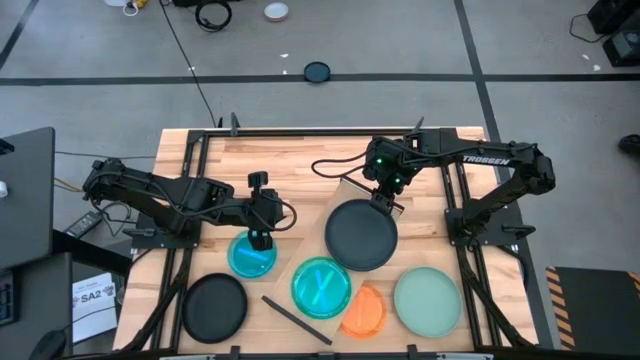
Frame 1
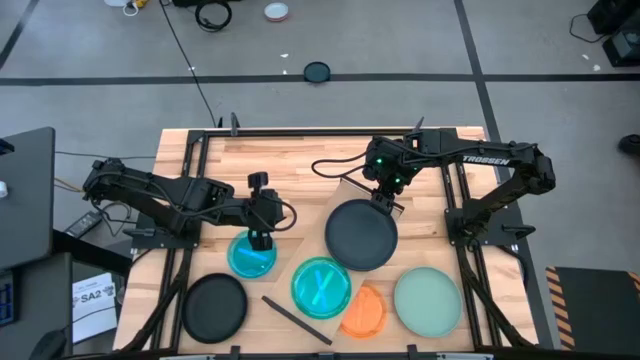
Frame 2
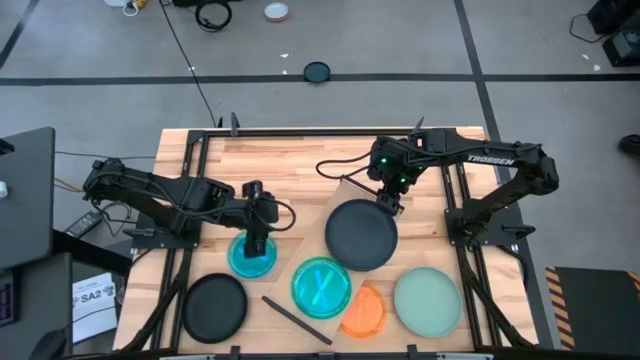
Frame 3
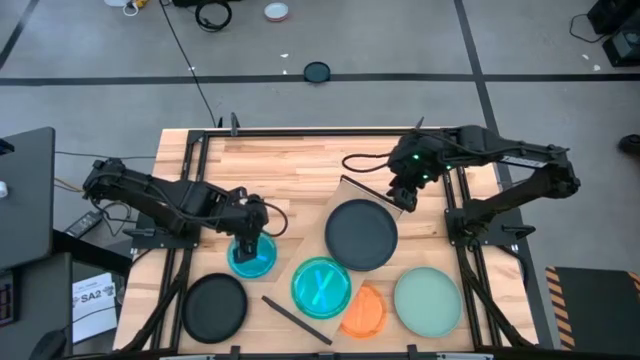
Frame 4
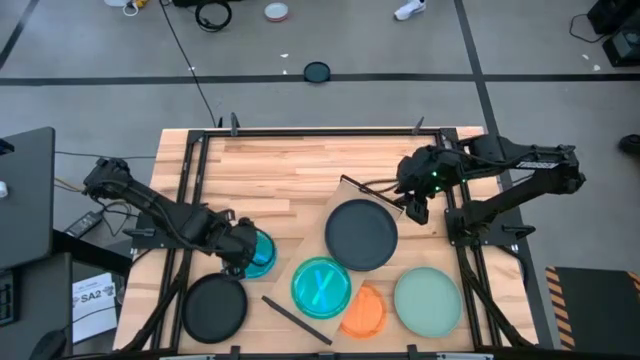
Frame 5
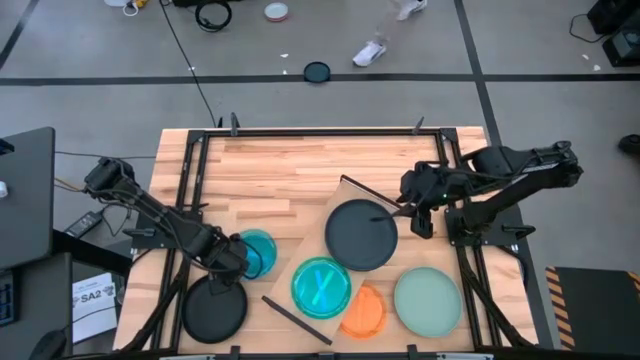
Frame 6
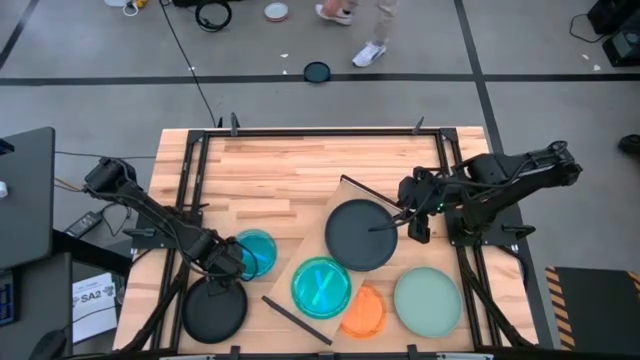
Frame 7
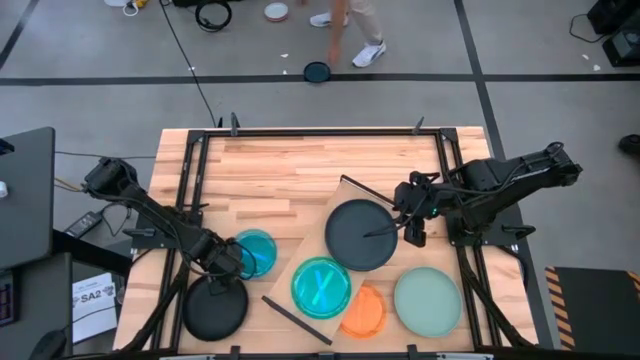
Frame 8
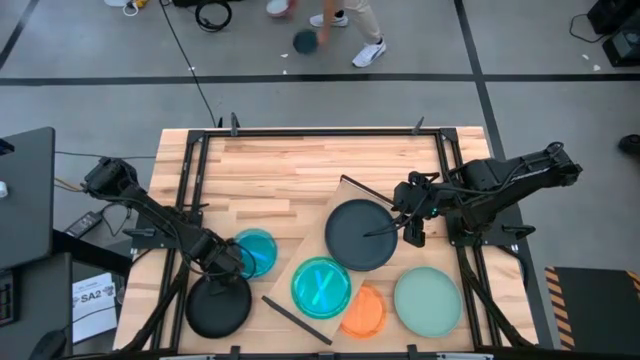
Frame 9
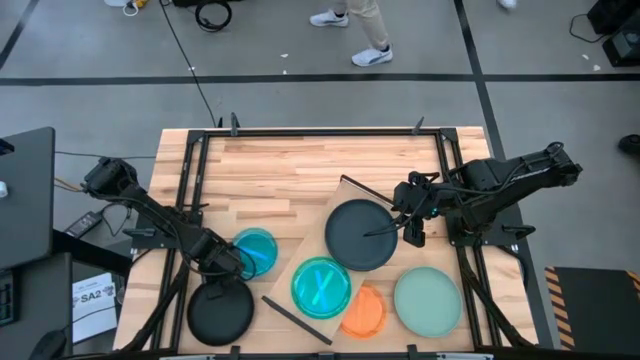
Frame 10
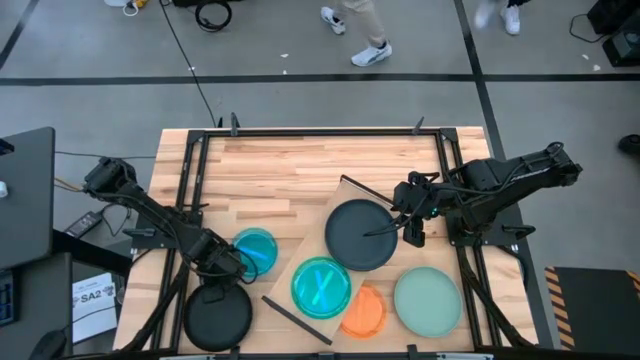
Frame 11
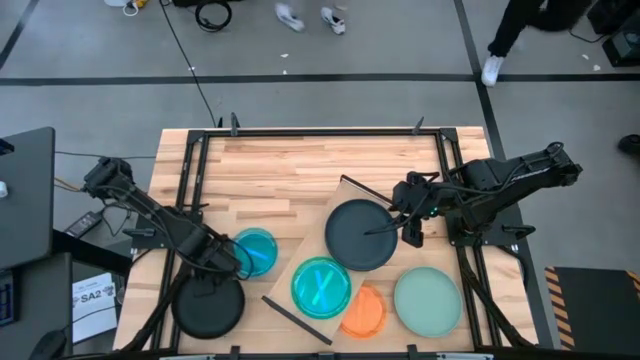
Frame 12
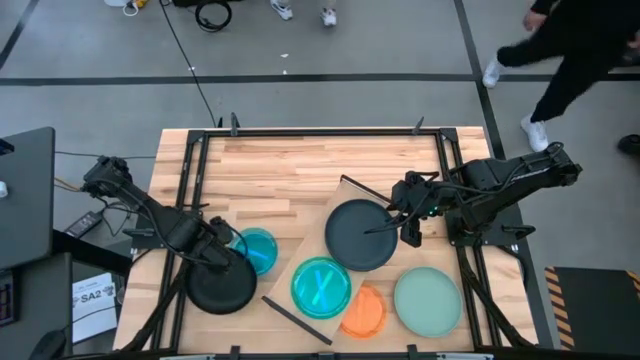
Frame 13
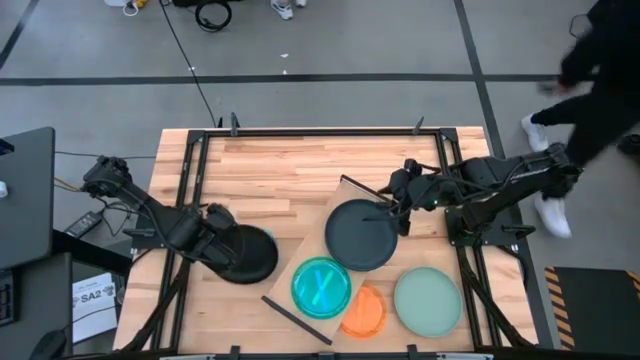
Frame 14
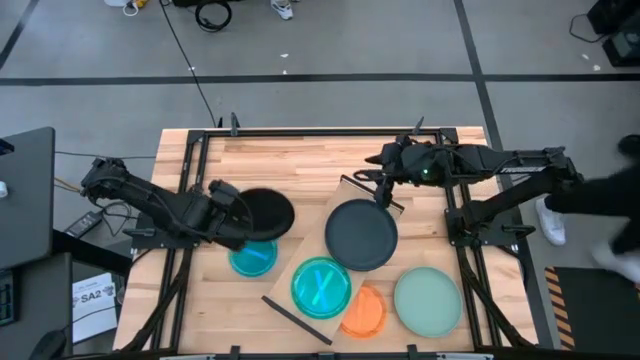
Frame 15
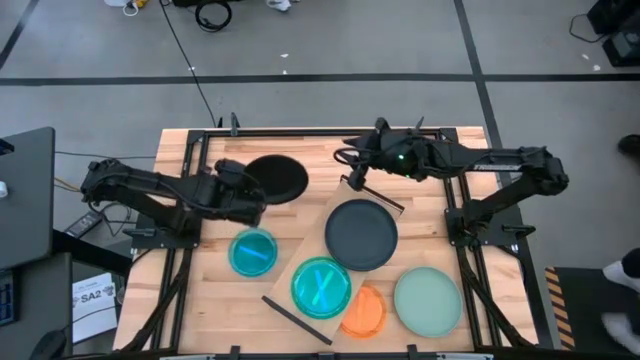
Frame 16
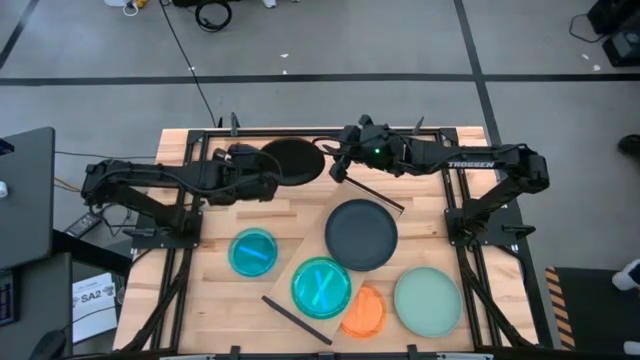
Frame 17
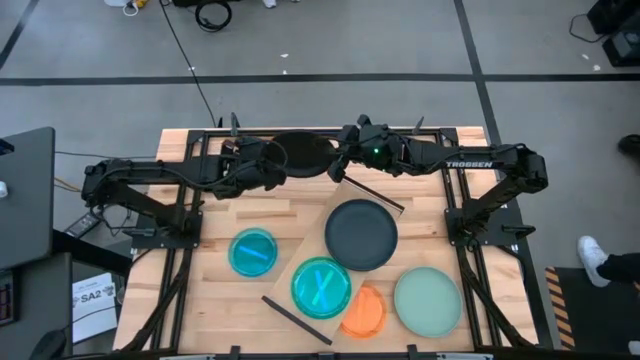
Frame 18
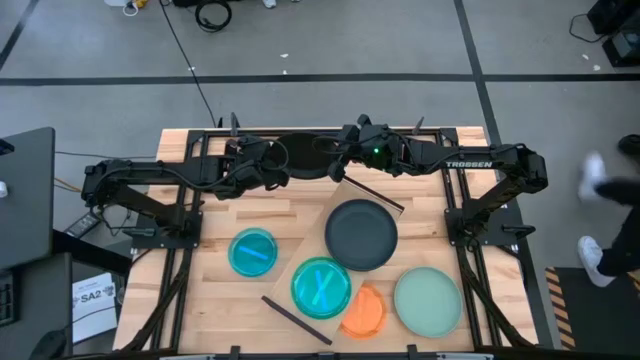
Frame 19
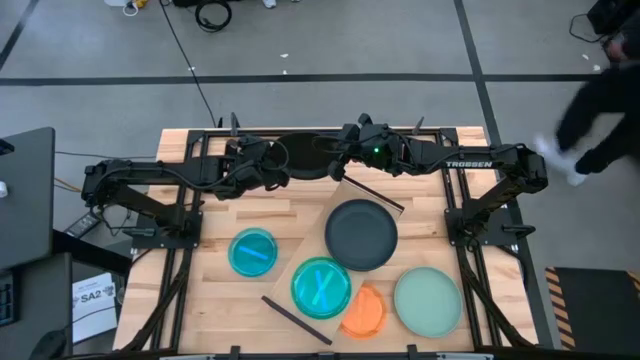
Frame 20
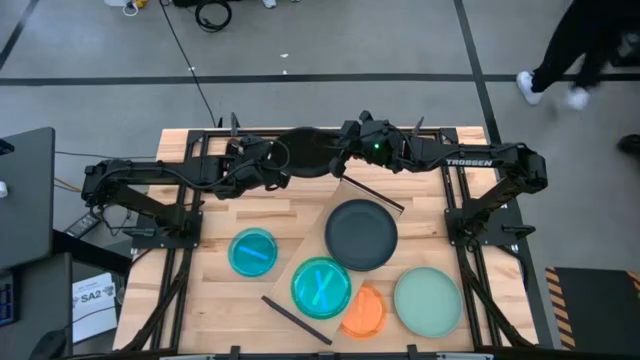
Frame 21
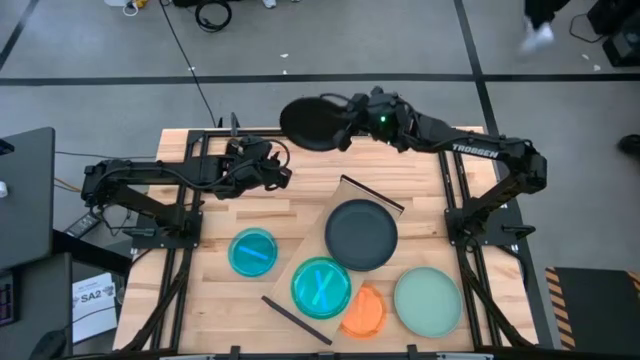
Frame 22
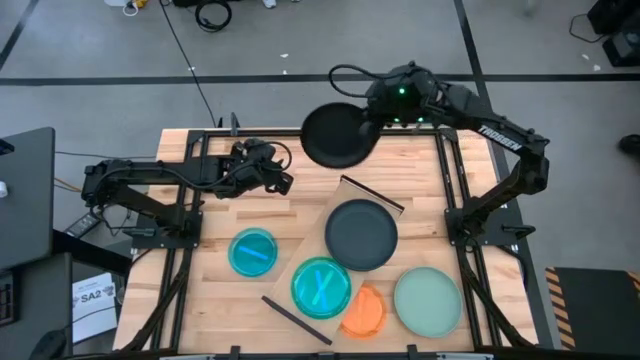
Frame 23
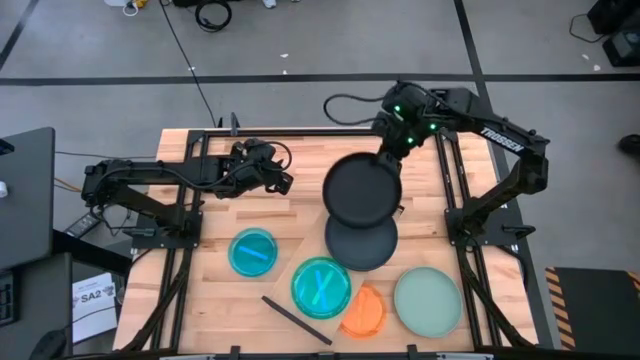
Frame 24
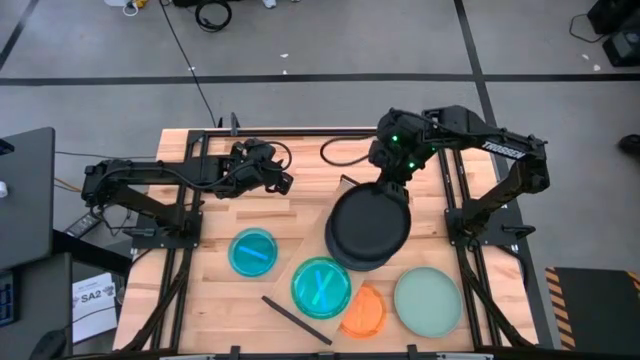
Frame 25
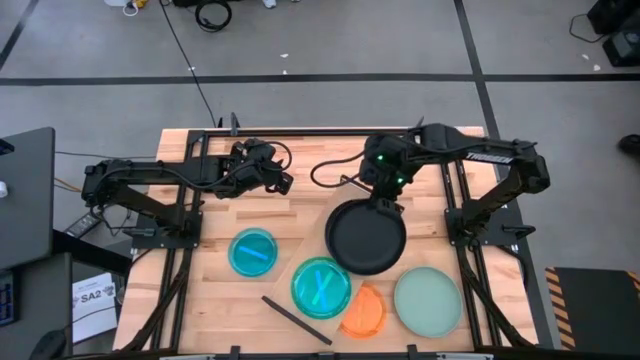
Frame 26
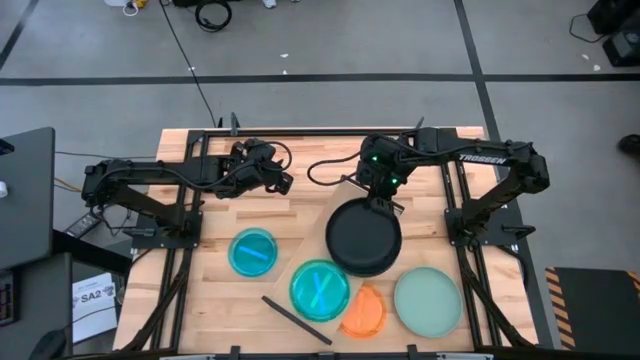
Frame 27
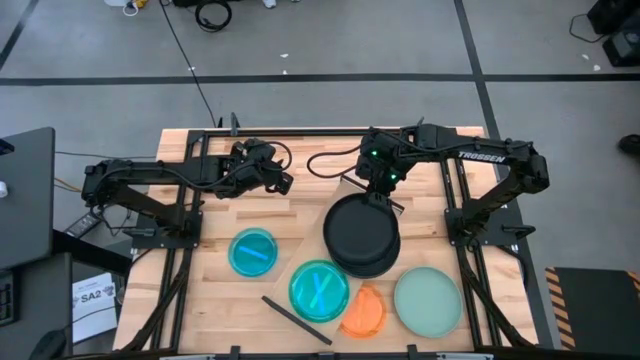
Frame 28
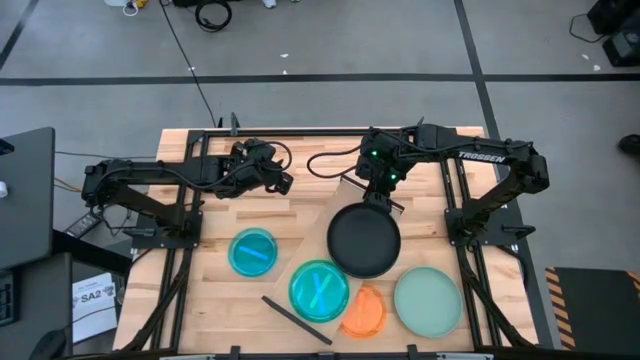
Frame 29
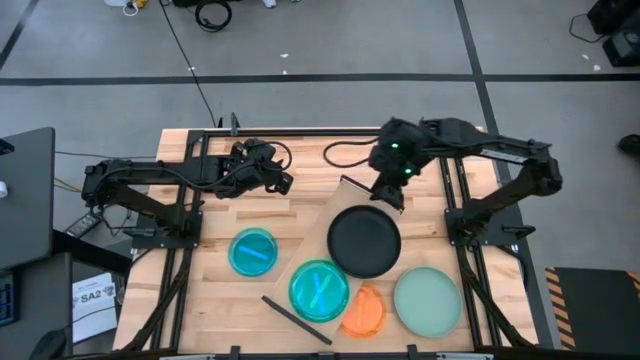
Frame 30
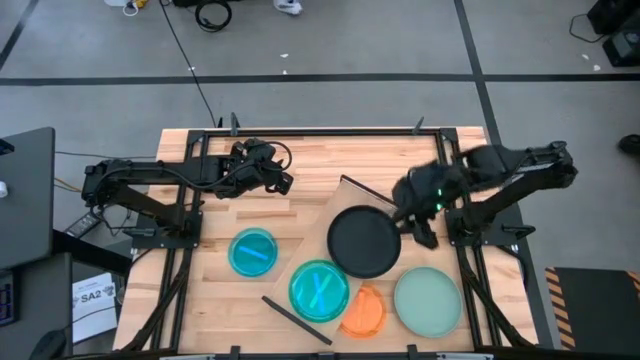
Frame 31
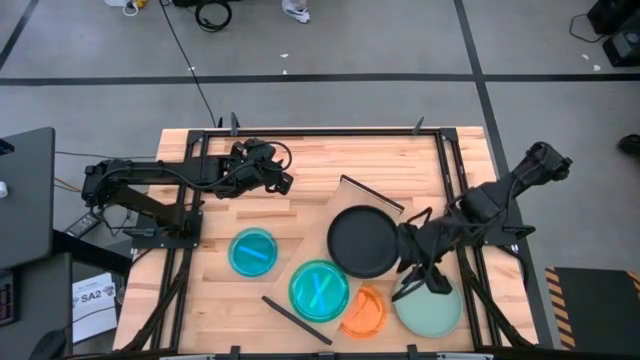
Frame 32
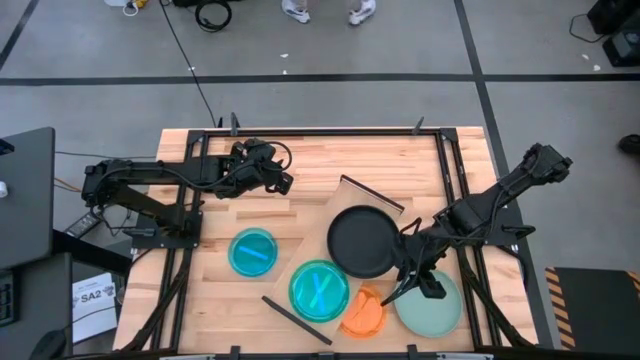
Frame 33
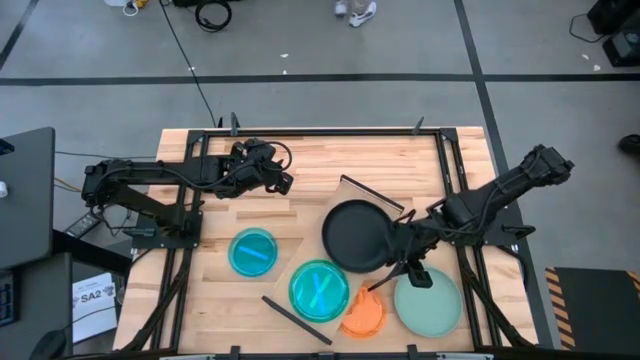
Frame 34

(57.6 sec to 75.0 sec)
Task: Place and stack plates onto a shelf
Stack the black plate on top of the black plate on the shelf
